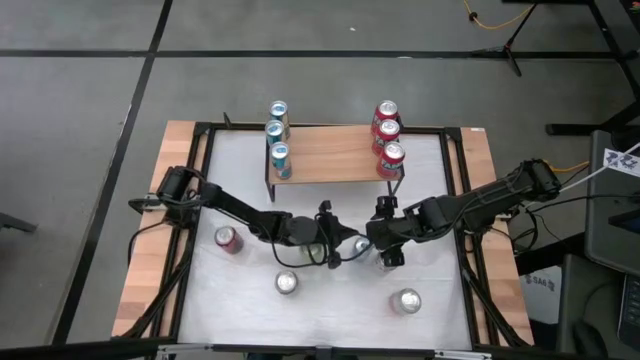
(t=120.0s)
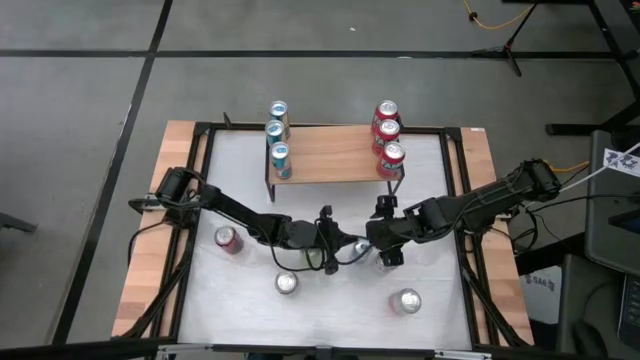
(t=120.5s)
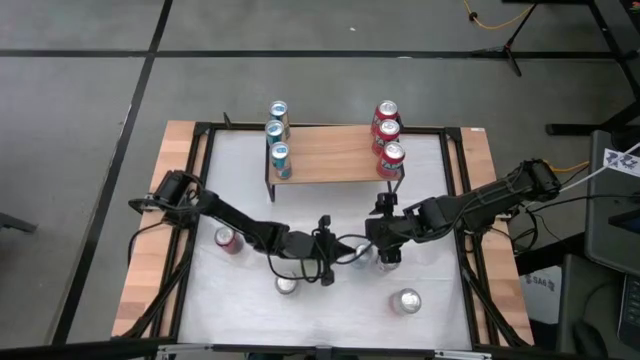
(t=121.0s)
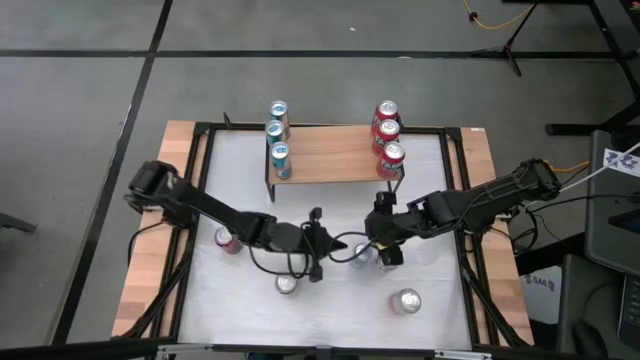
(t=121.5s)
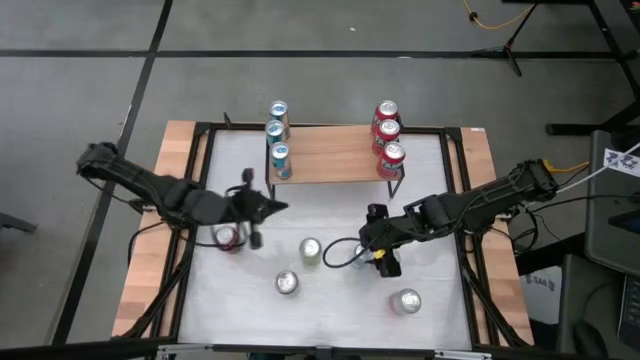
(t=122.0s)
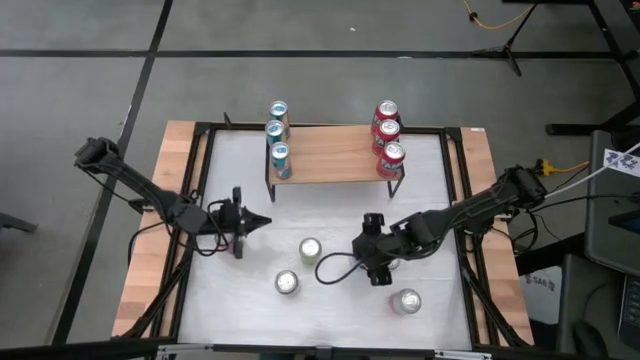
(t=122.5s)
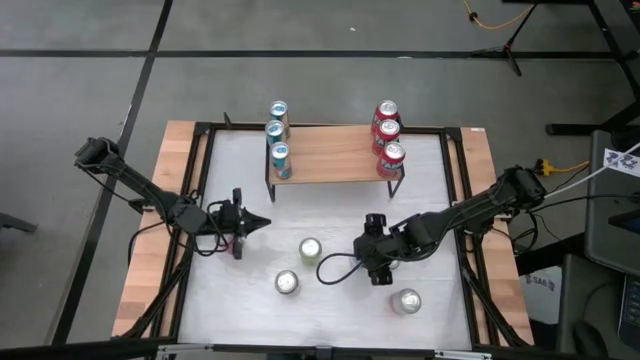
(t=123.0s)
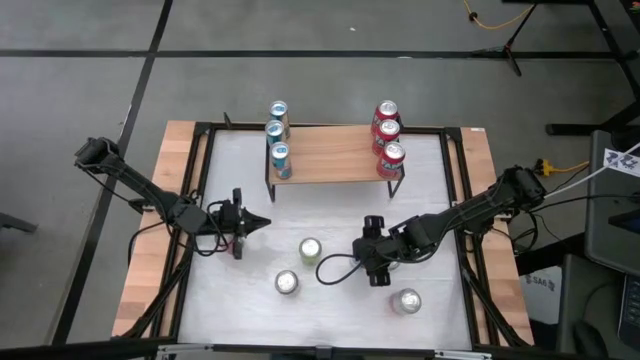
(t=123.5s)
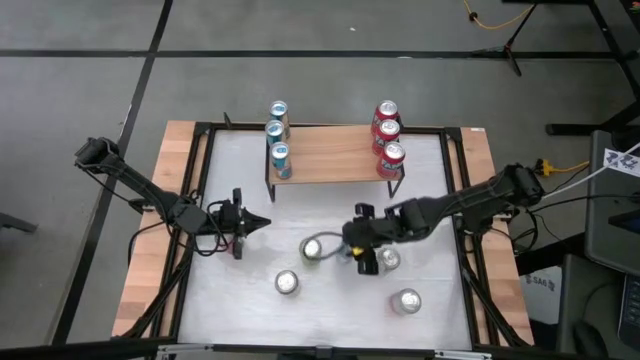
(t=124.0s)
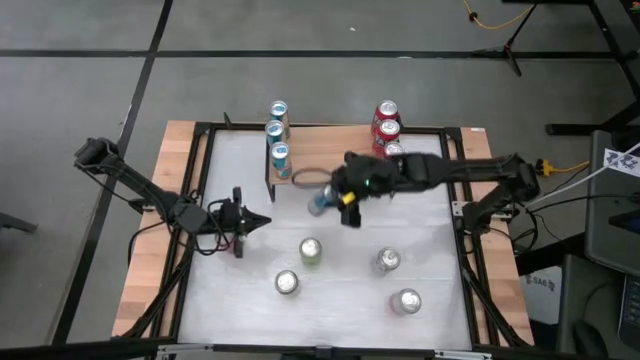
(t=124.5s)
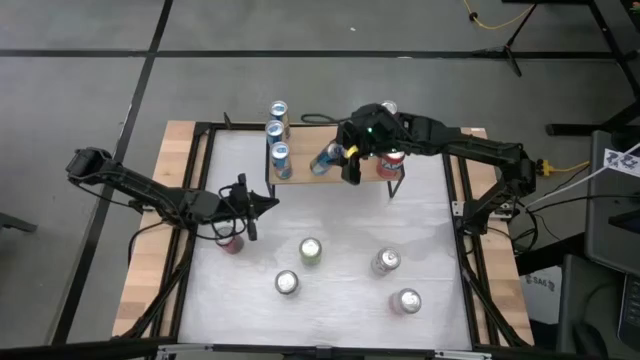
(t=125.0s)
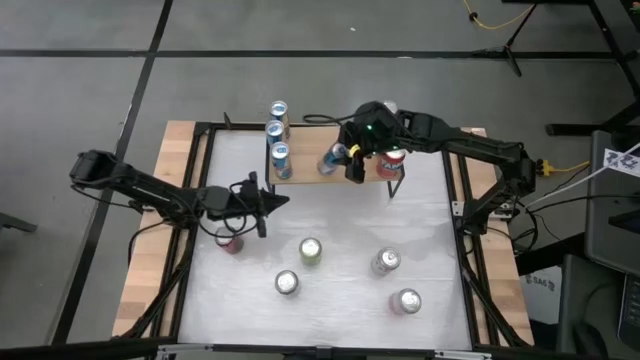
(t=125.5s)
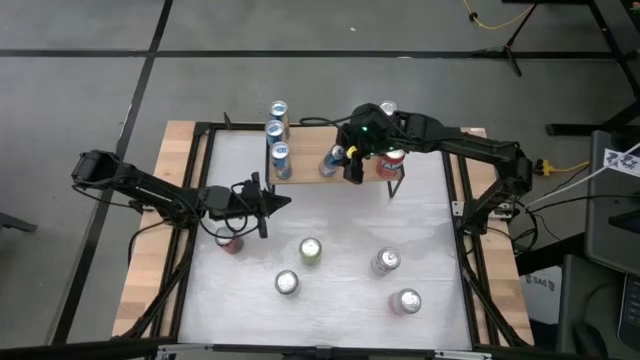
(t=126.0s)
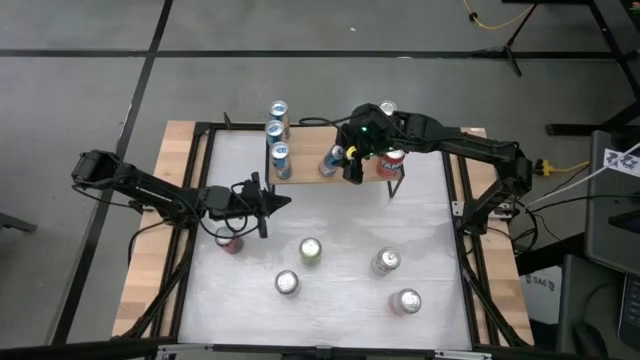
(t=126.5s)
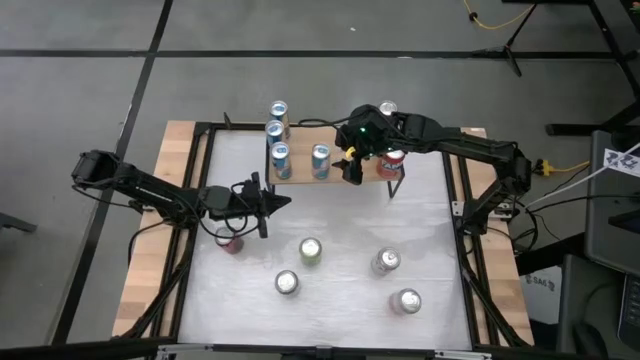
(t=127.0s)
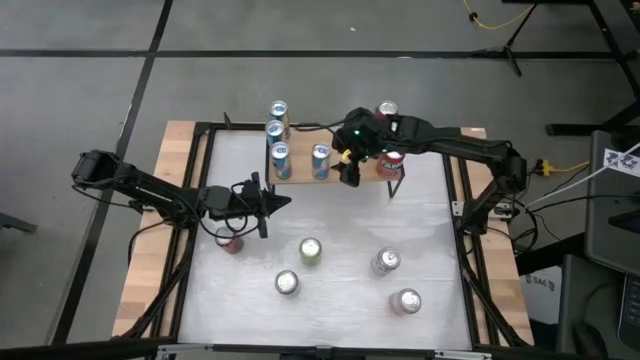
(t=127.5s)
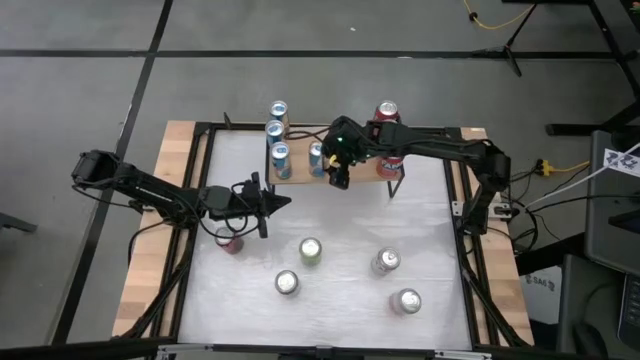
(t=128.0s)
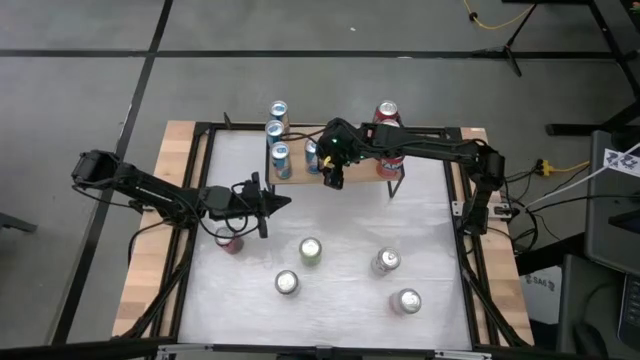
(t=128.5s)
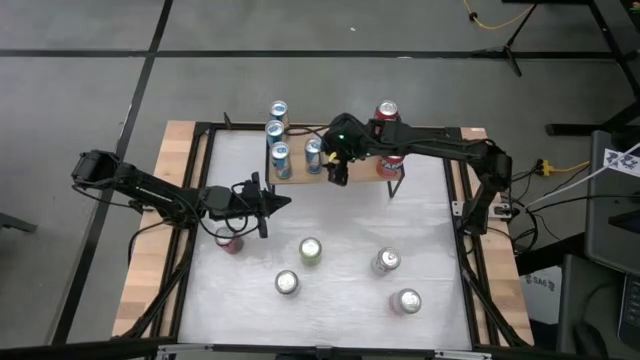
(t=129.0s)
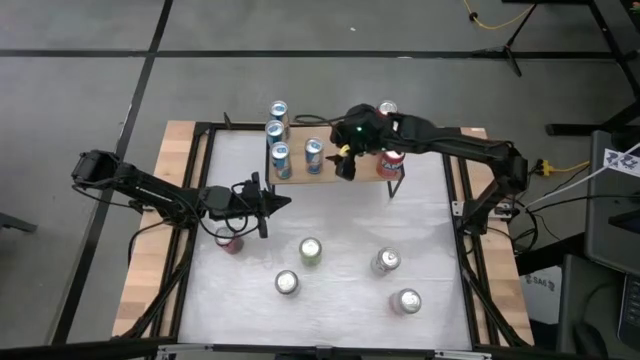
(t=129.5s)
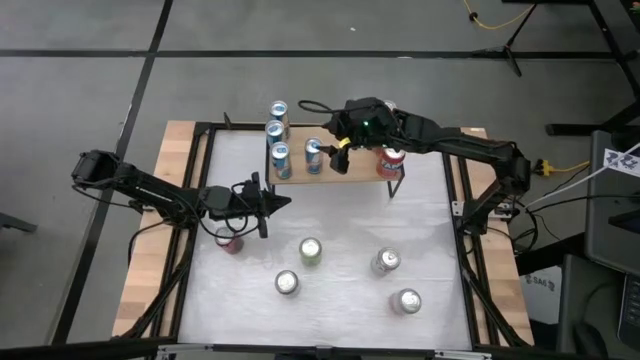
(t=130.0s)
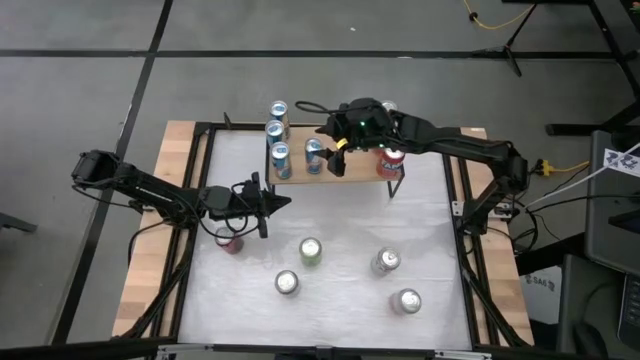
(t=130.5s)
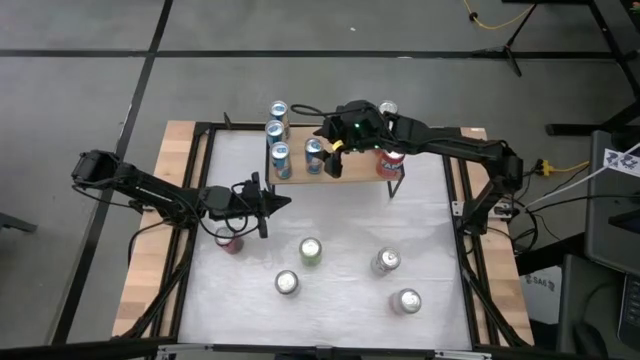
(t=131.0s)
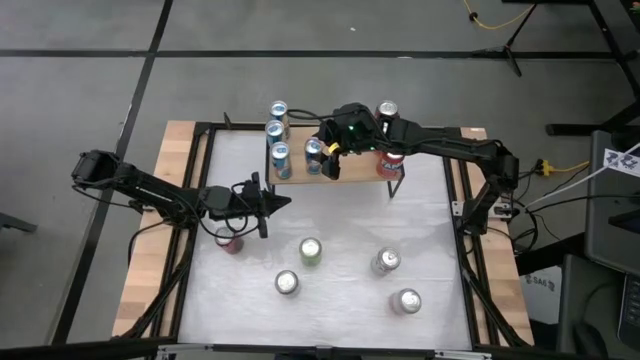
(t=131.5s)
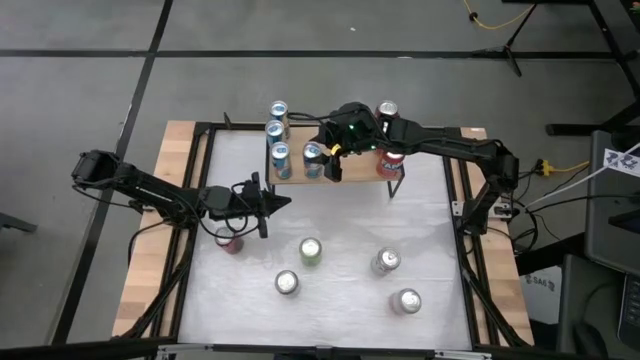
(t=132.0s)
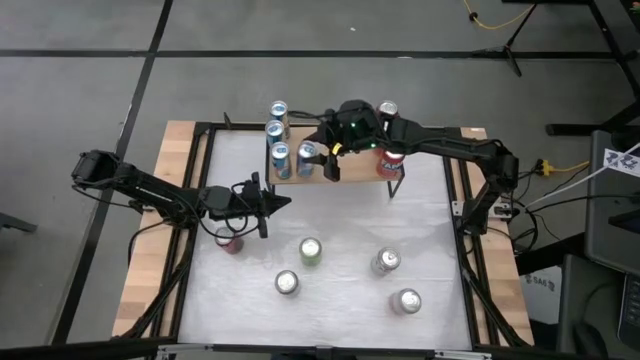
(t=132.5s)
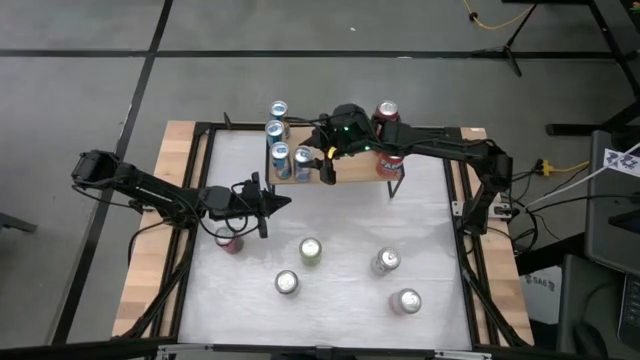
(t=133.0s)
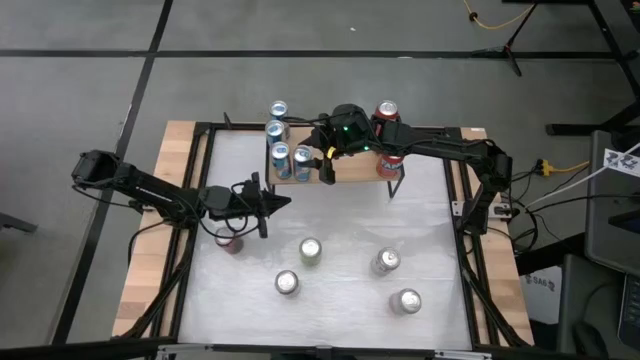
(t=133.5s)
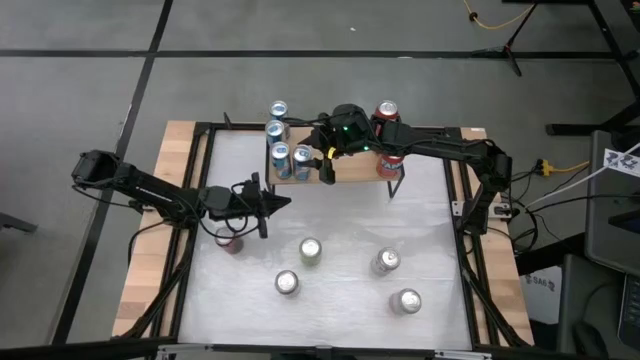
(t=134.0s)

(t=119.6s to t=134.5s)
Task: Sort soda cans
Put the blue soda can on the shelf aligned with the blue soda cans

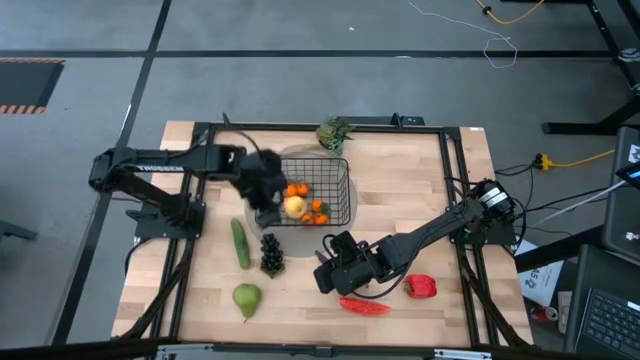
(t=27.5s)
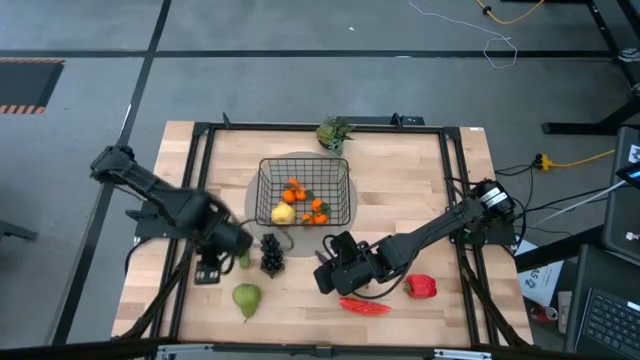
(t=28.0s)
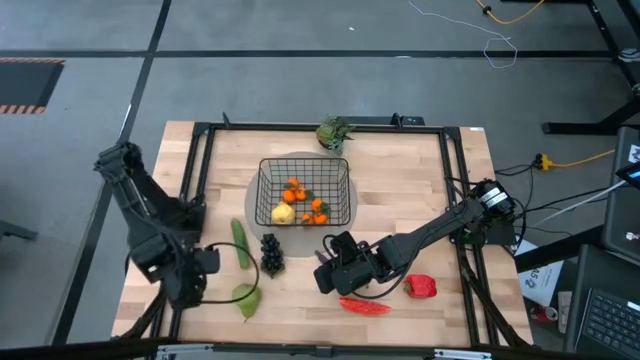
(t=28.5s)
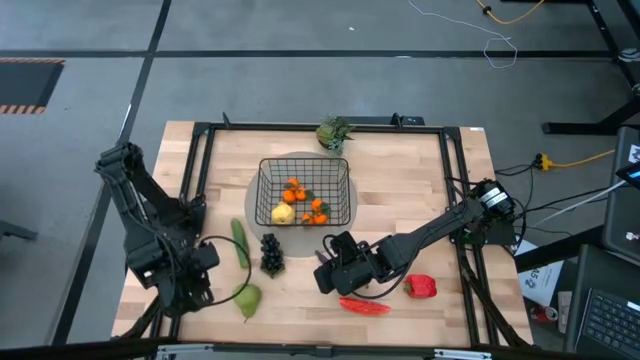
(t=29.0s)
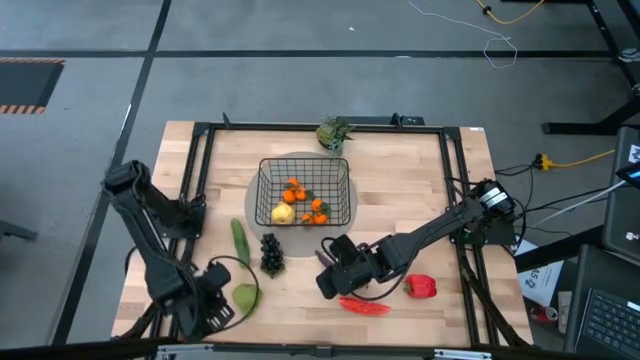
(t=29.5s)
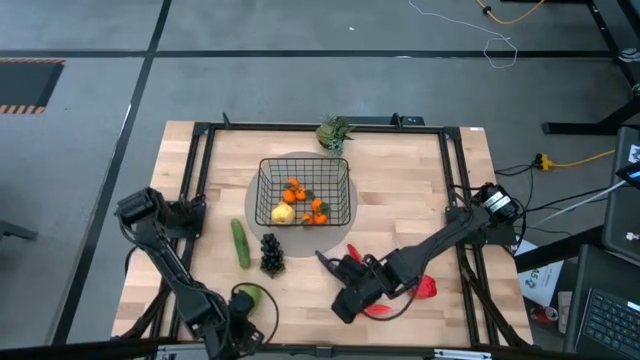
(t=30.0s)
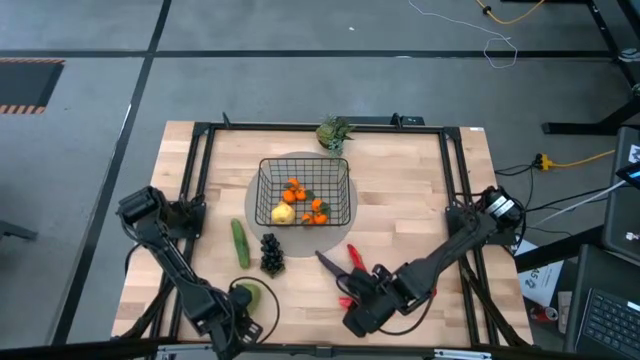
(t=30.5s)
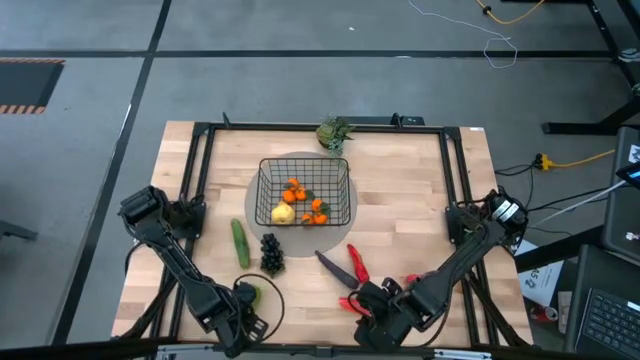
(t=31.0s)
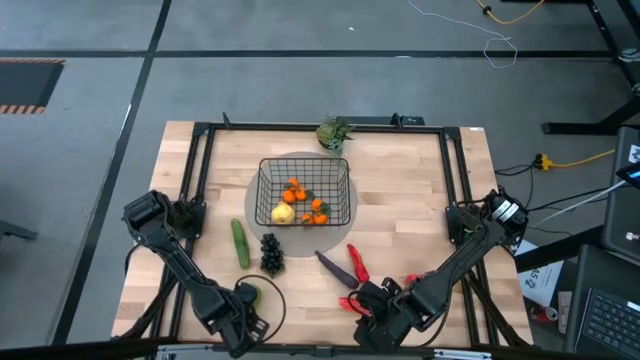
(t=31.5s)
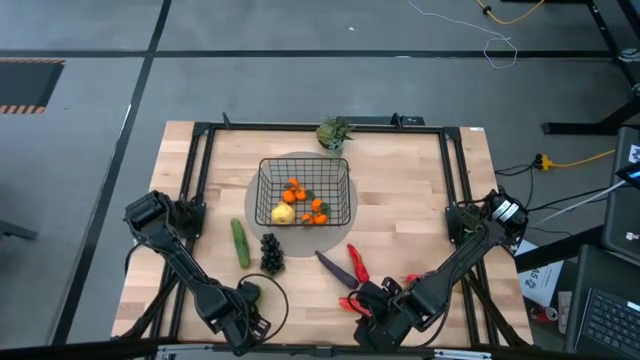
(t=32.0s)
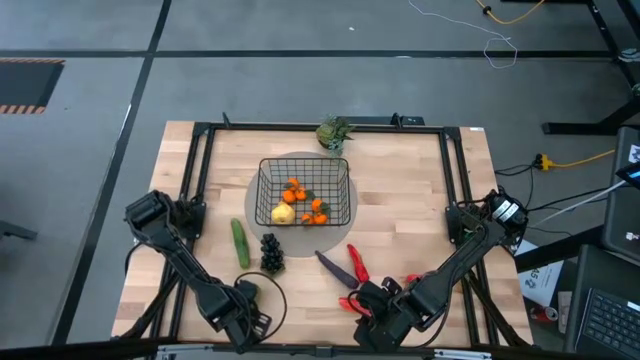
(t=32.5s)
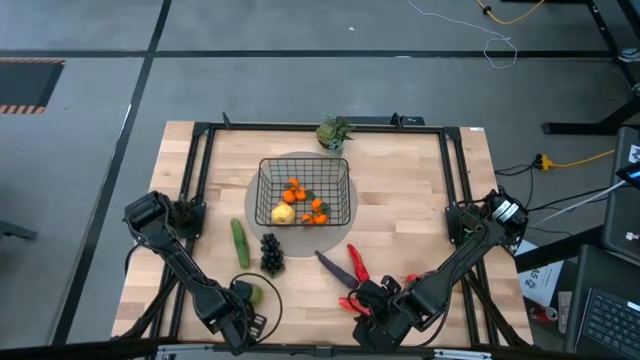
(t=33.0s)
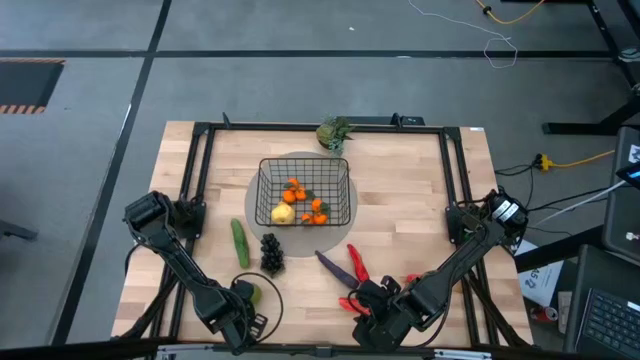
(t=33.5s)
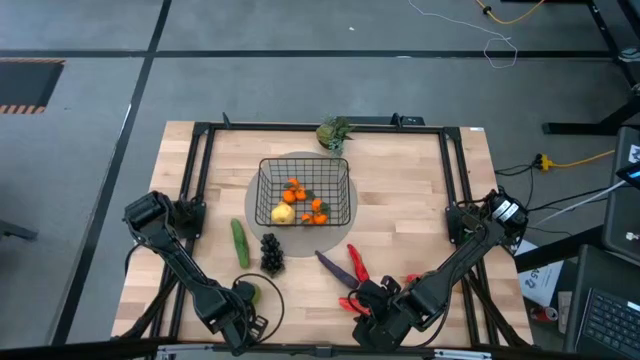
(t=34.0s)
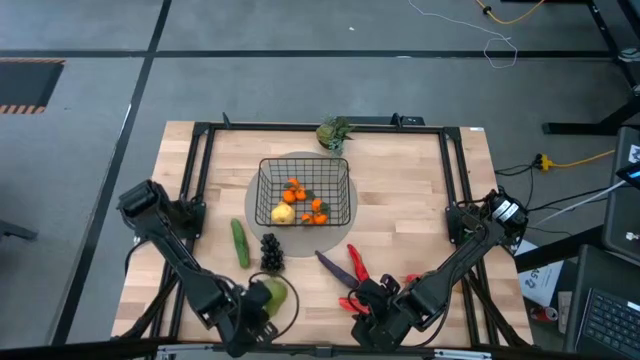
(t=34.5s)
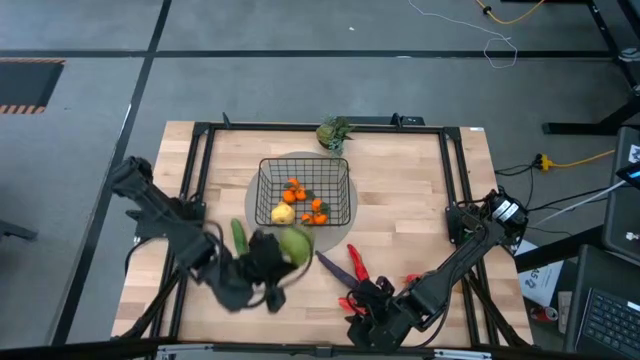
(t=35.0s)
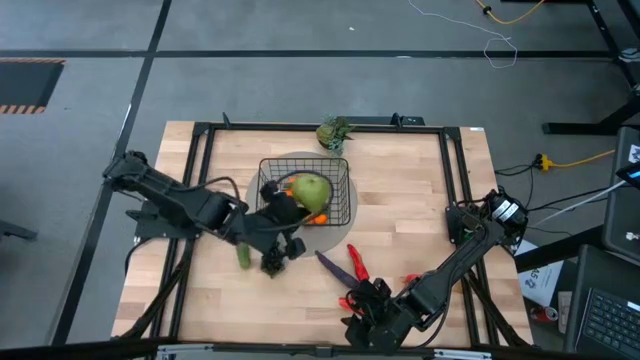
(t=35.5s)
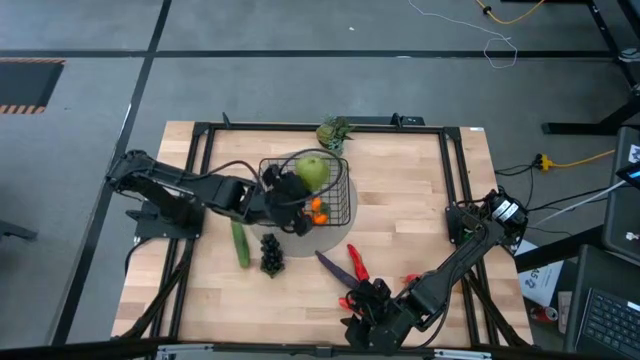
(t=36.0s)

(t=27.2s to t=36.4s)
Task: Build produce basket
Put the green pear into the black wire basket
